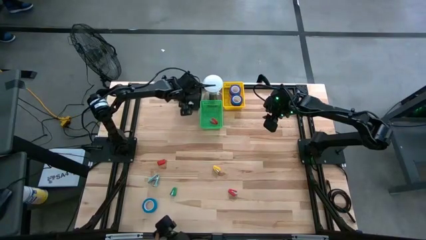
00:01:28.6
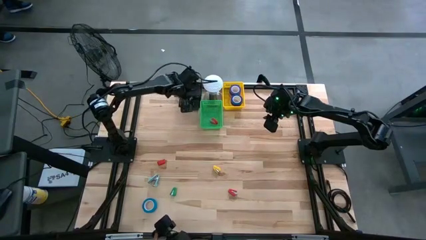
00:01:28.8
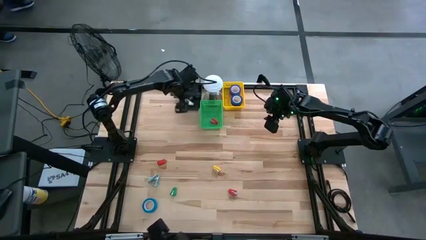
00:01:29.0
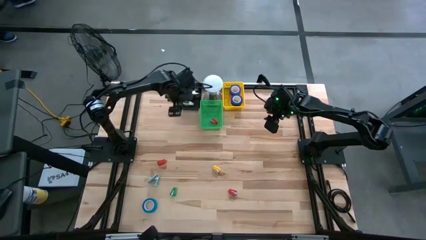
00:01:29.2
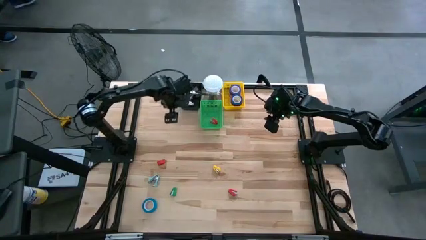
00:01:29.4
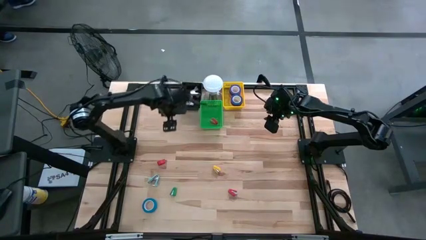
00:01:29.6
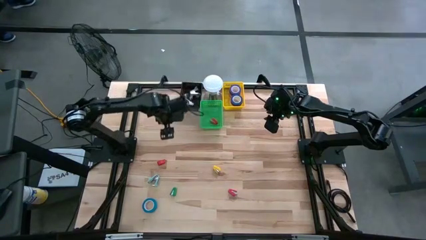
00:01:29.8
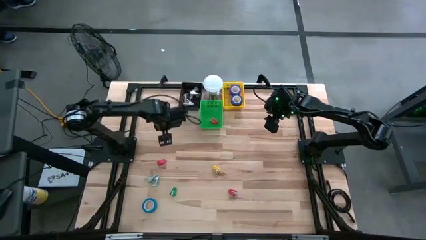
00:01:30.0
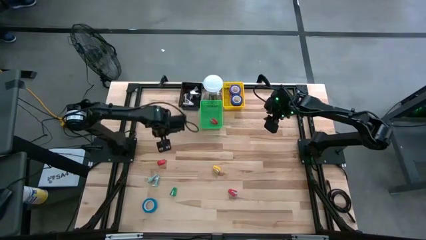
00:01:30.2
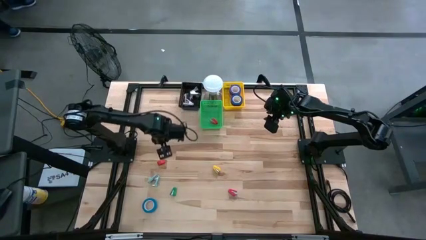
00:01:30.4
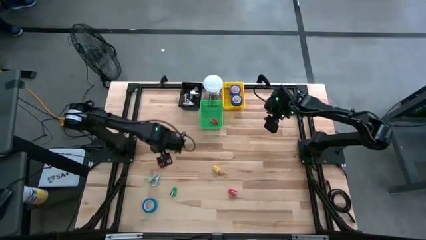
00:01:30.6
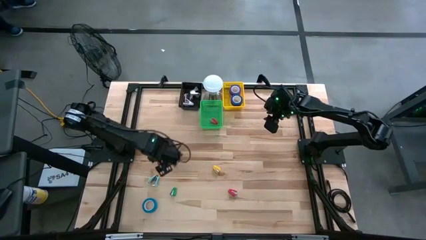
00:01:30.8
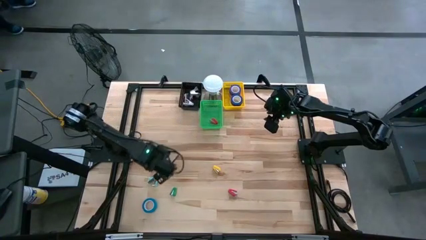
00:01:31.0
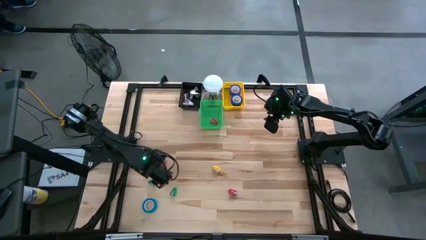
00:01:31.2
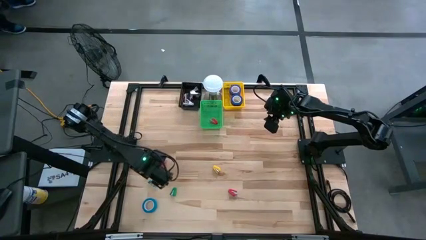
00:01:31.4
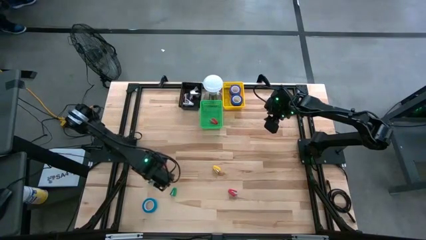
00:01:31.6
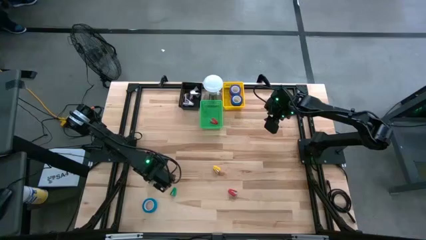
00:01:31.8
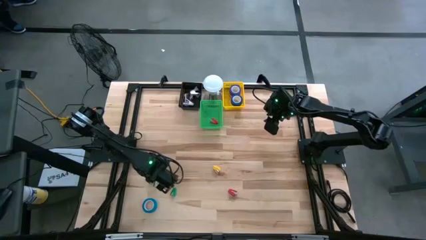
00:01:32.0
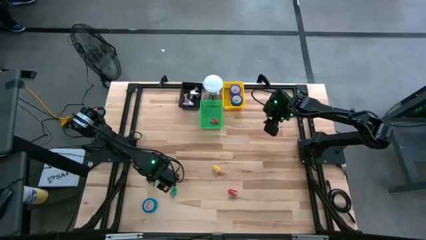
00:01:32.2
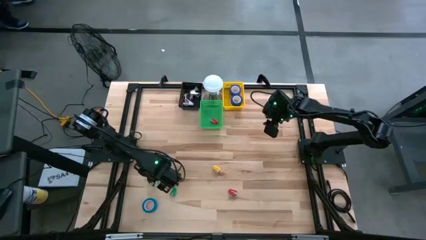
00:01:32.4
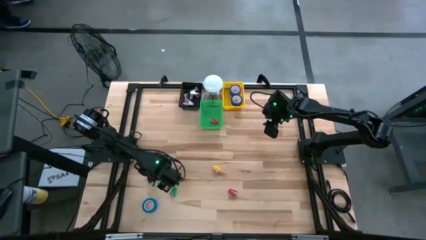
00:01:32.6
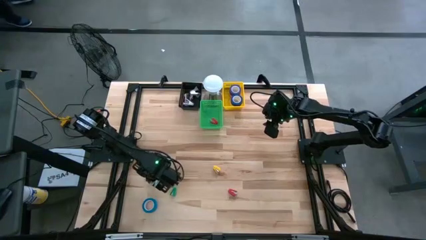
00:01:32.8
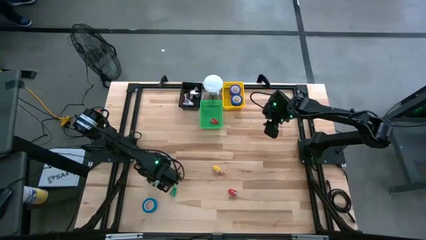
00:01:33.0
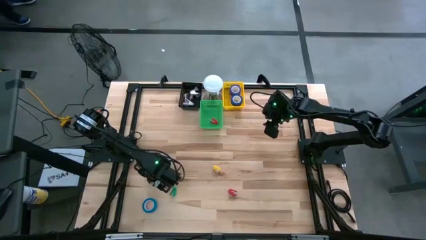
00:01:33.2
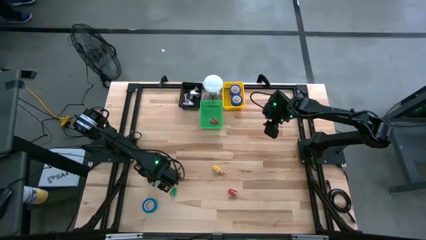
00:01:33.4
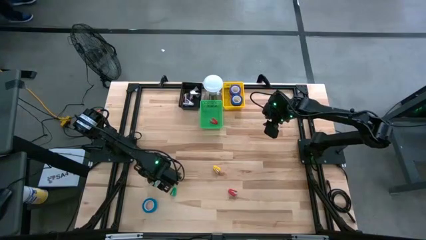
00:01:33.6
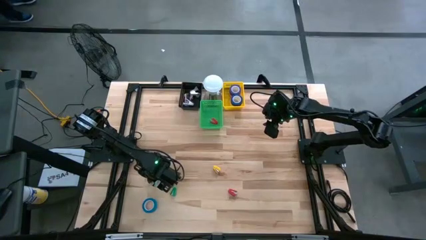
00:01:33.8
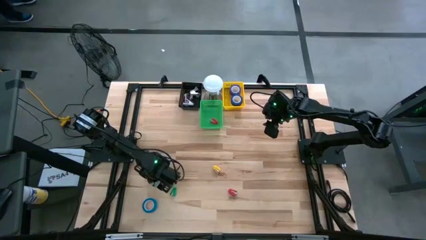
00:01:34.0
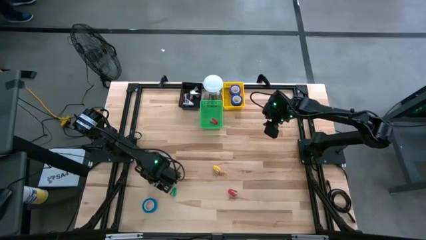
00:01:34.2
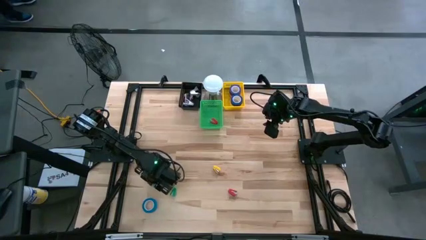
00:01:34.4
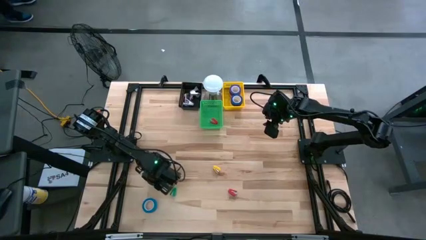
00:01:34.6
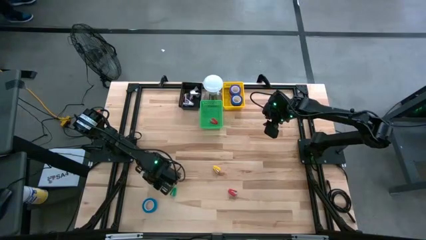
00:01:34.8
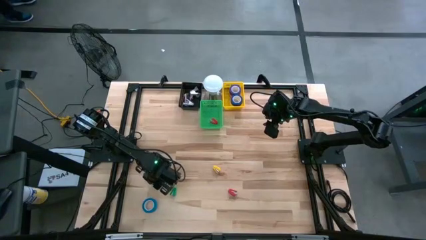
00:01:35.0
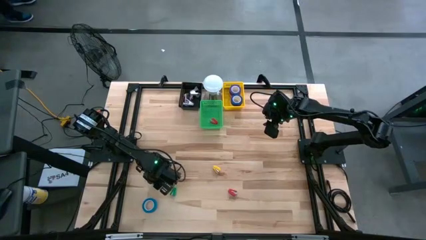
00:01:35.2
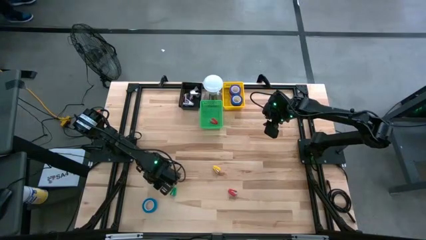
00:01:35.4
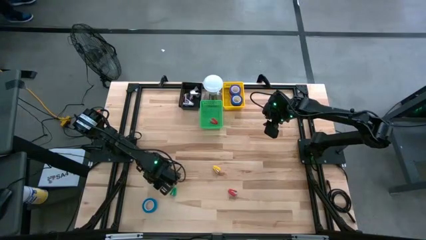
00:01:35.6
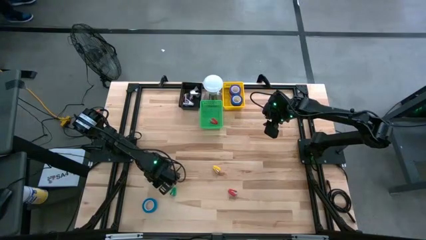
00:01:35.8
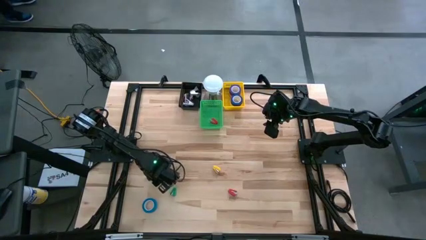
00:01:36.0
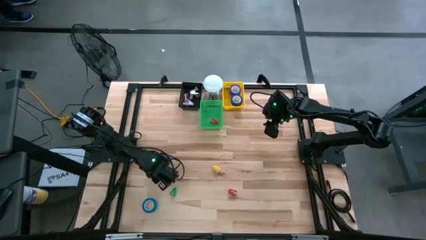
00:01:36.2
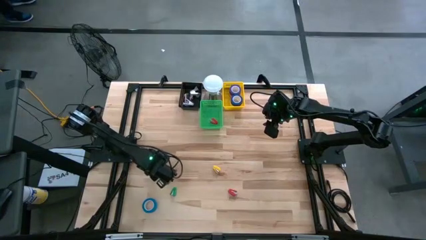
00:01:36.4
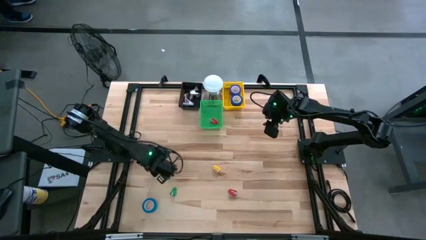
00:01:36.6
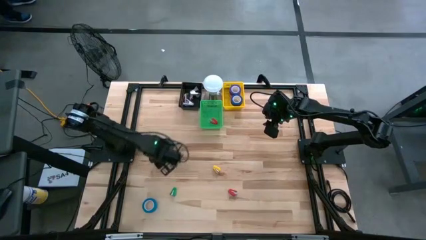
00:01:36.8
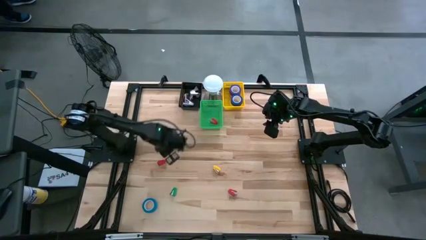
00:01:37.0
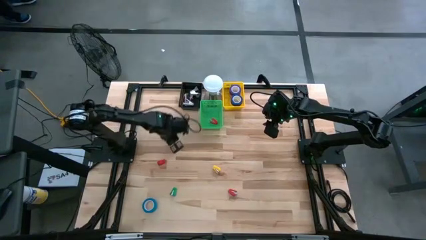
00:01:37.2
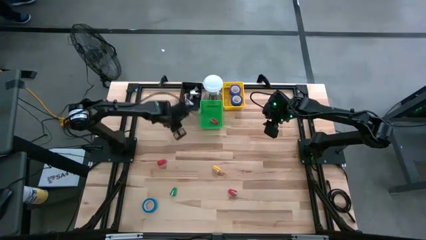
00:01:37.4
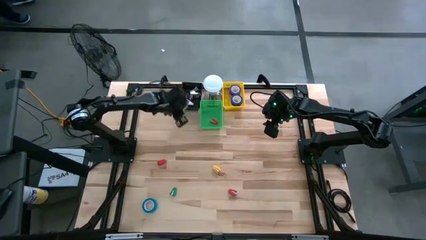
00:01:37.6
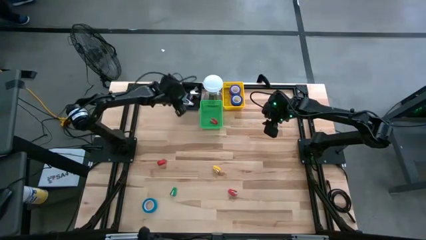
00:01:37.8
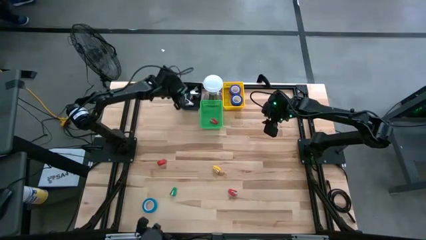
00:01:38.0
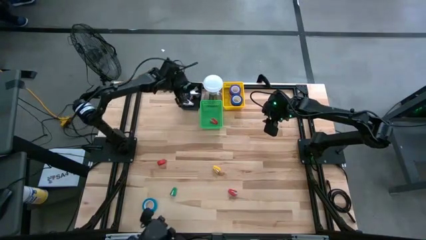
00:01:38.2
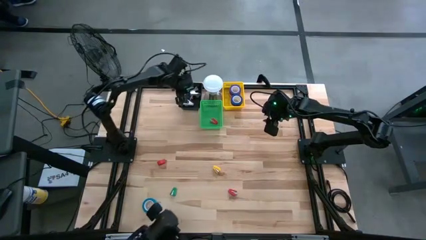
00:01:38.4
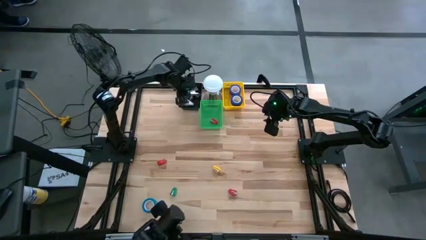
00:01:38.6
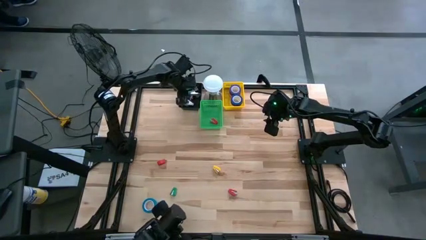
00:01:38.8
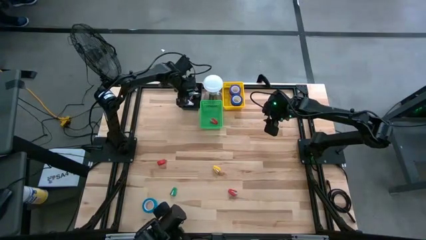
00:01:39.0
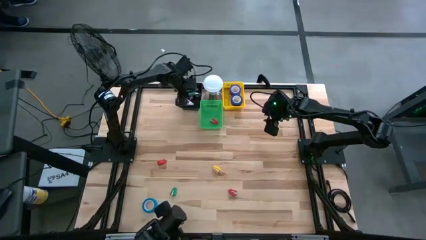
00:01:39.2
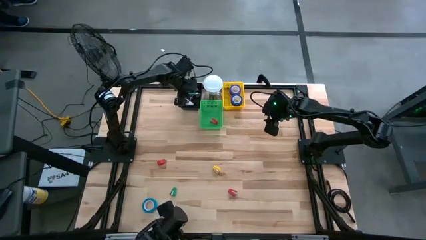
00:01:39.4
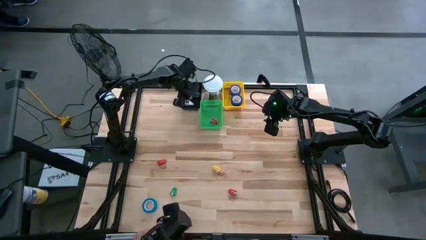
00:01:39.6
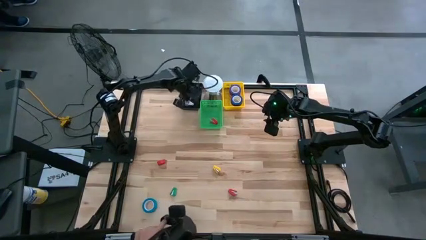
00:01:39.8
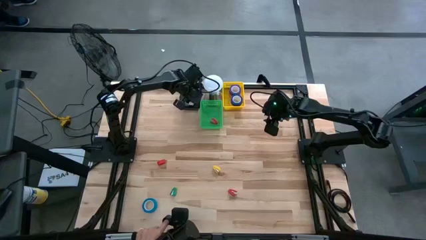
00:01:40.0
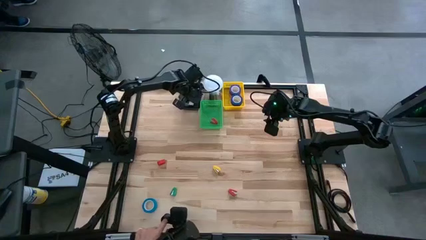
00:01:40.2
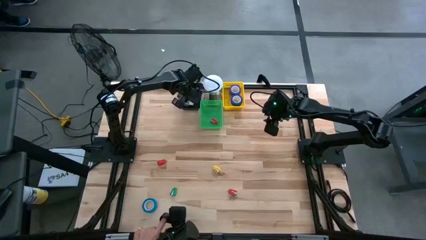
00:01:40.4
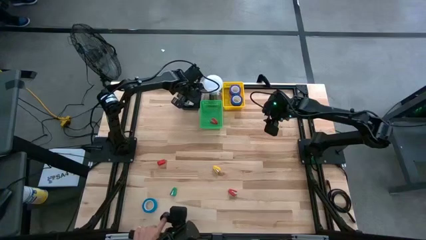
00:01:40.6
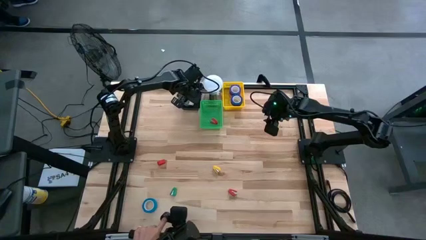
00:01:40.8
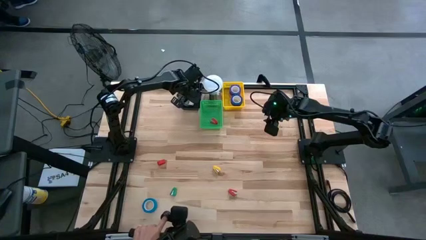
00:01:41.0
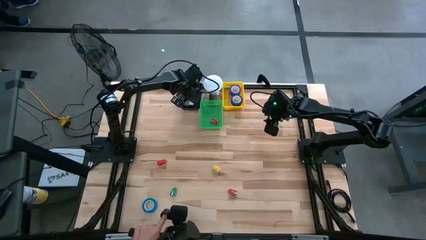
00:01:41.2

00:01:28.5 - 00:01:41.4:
Task: Pick and place Stapler, Stapler remover, tape
Put the blue staple remover into the black bin

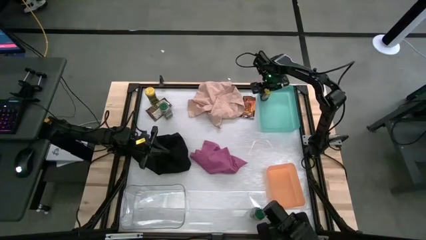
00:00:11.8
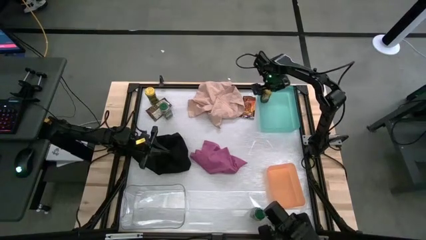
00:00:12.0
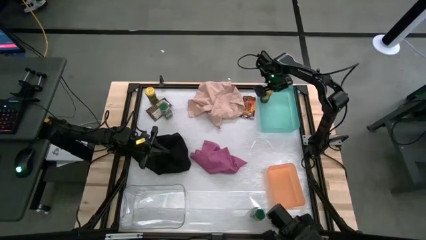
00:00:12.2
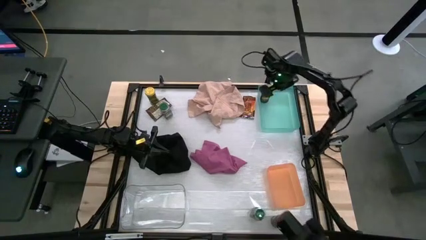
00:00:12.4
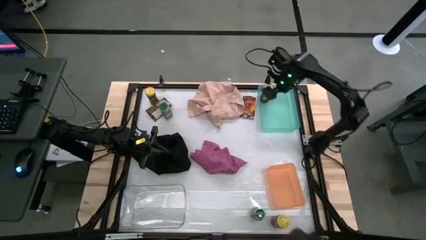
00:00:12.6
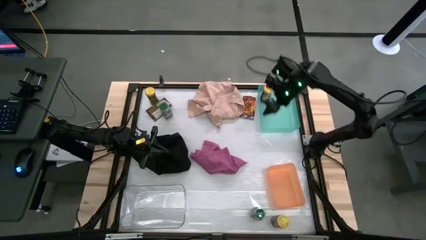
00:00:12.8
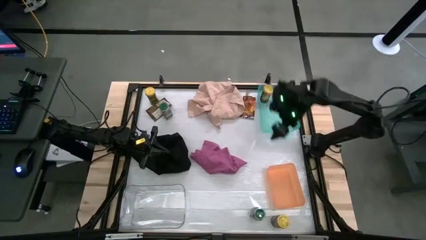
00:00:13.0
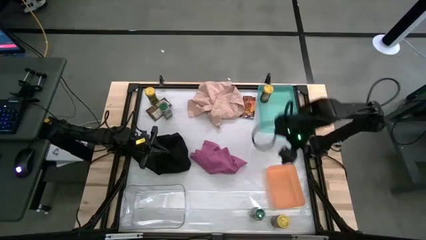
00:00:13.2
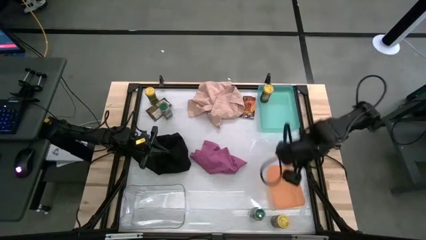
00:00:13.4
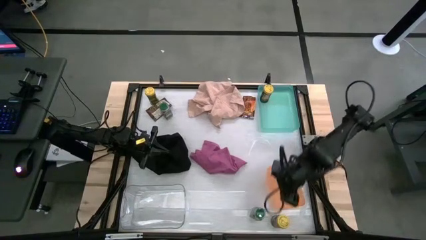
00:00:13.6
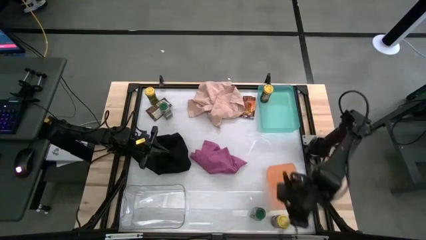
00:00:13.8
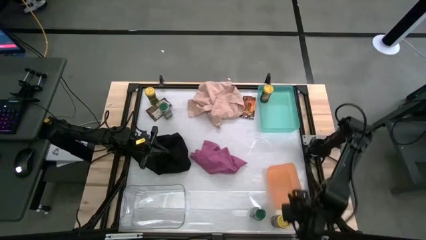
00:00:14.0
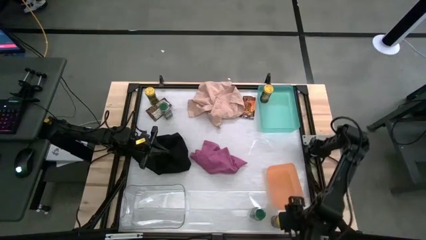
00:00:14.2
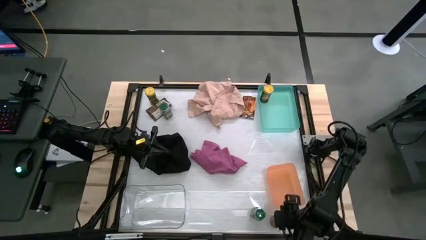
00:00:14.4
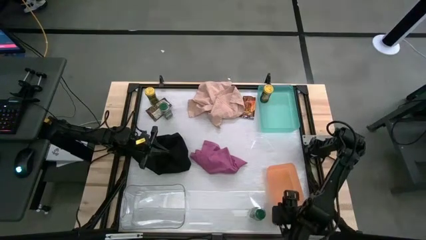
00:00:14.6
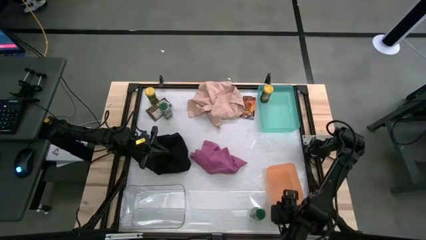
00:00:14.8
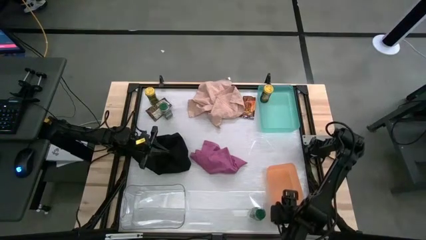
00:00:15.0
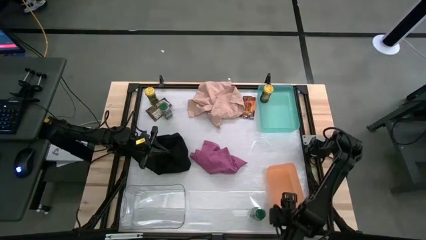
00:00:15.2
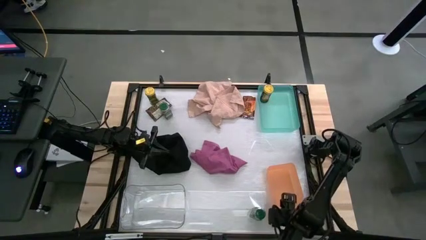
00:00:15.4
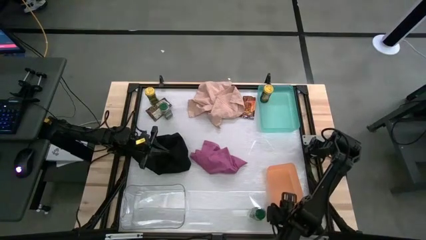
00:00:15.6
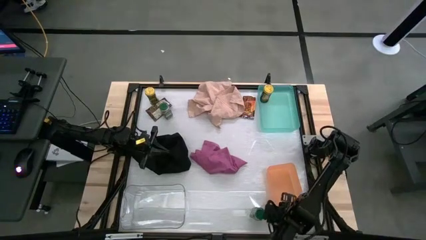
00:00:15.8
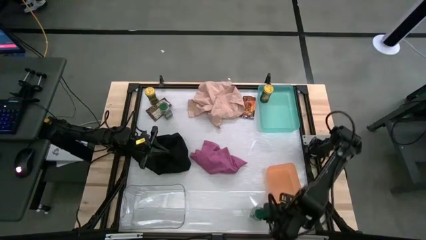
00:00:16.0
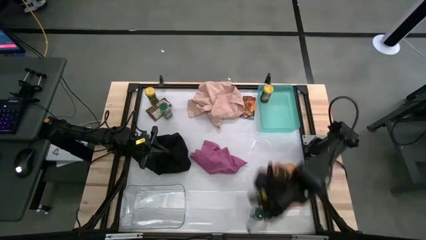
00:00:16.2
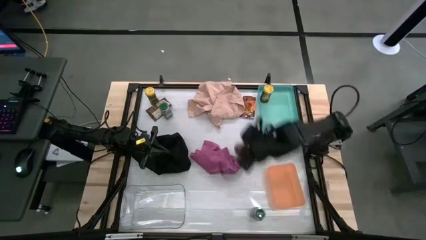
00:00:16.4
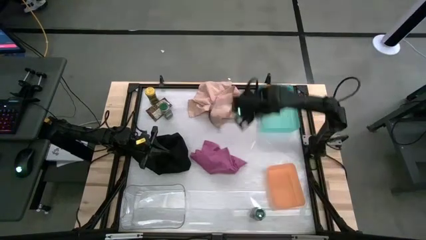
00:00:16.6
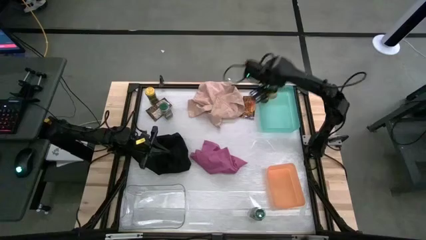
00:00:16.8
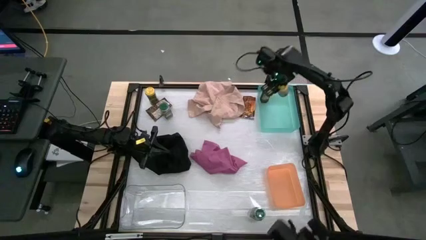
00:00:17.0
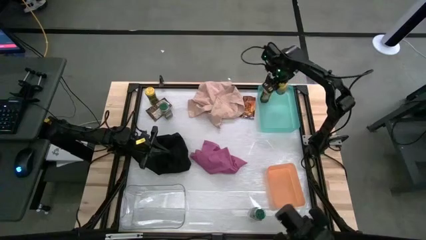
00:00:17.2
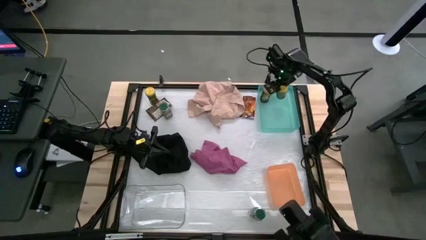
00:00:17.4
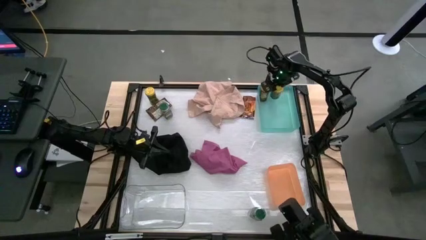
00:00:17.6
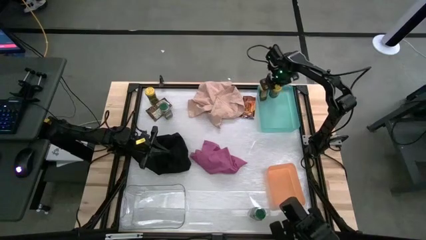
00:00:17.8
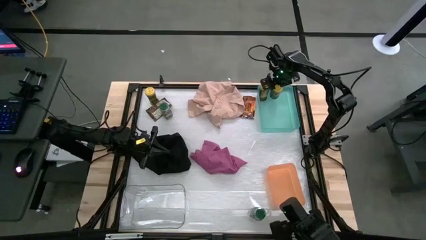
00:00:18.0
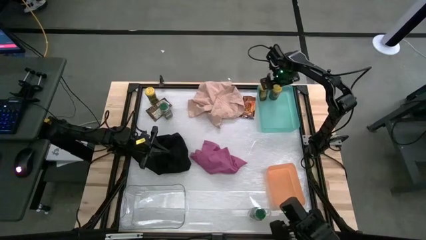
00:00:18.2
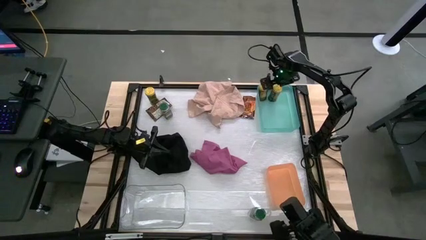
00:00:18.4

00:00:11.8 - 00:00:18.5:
Task: Sort spices by type
Put the bottom yellow seasoning bottle into the light blue bin
